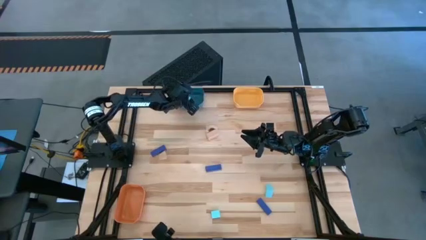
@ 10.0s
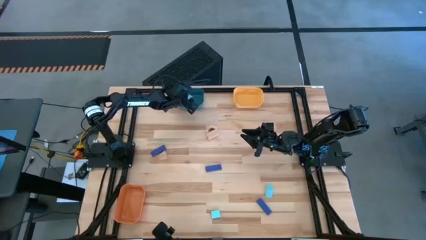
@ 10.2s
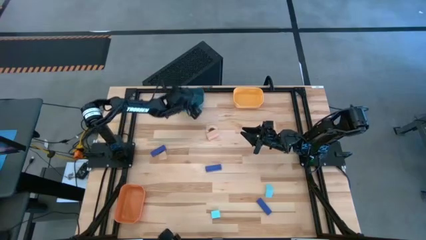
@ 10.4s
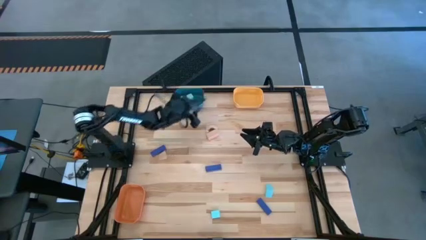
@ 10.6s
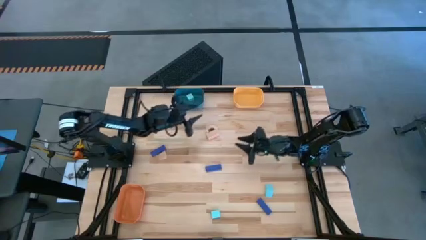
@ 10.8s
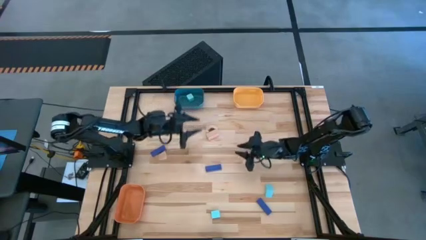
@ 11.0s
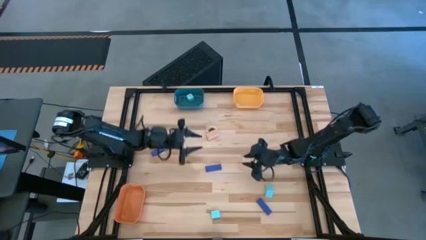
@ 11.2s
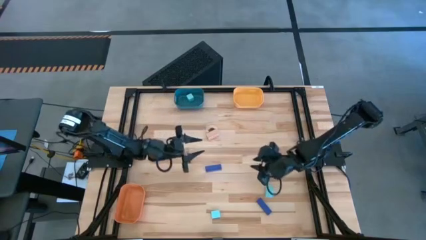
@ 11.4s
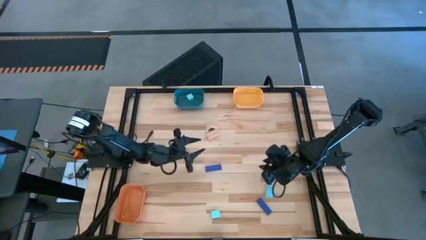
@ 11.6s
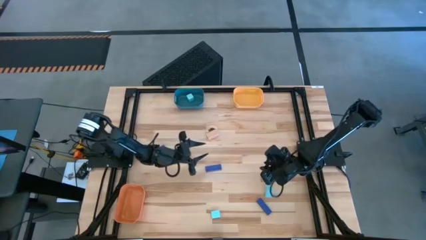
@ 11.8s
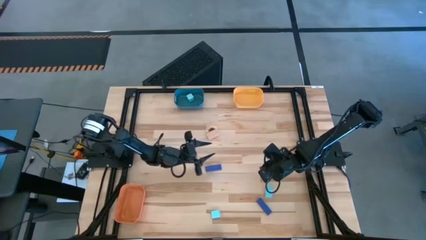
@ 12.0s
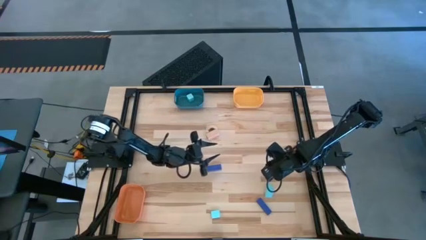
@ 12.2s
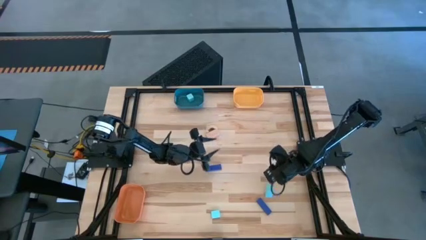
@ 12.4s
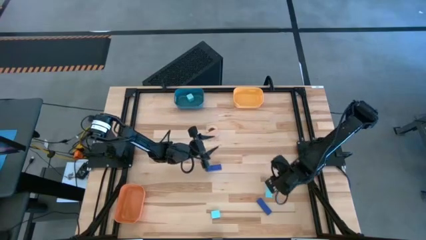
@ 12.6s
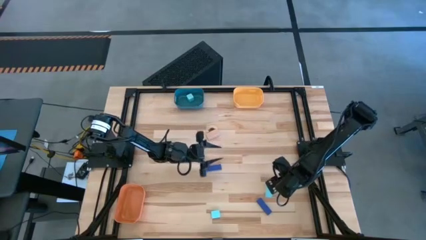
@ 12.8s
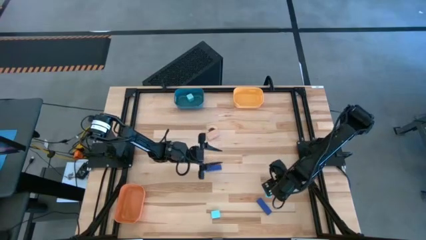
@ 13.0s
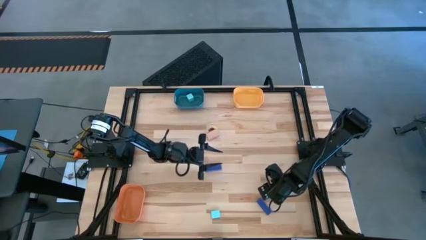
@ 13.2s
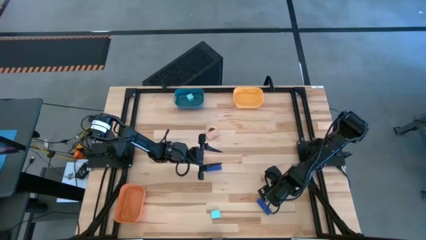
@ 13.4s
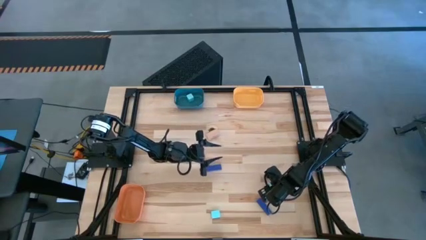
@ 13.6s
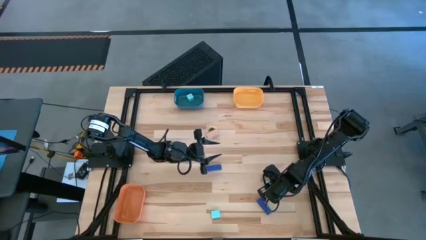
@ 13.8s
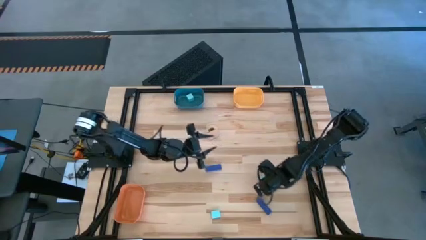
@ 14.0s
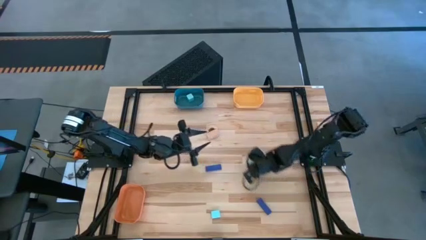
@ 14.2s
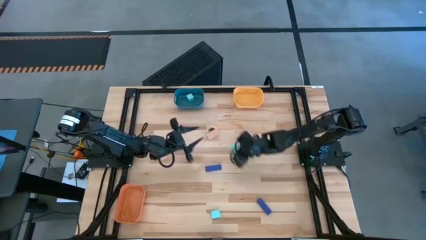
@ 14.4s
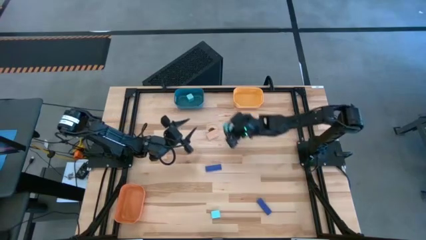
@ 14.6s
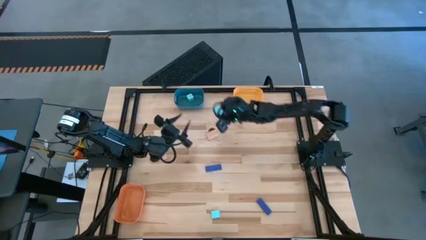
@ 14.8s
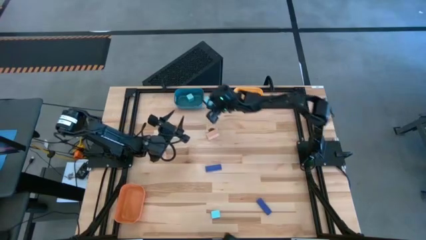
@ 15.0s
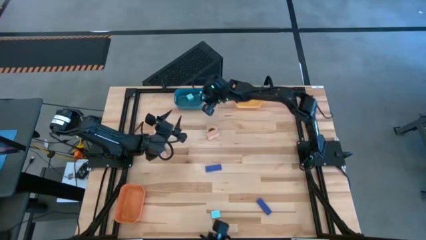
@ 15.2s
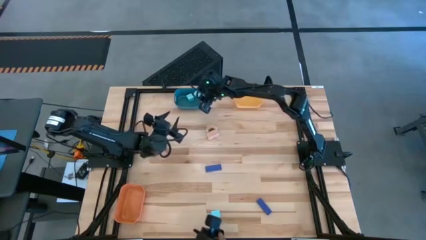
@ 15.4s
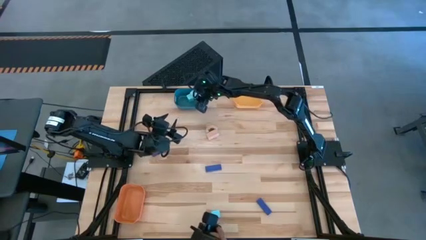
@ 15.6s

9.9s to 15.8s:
Task: Sort & place blocks by color
Put the middle right light blue block into the dark blue bin

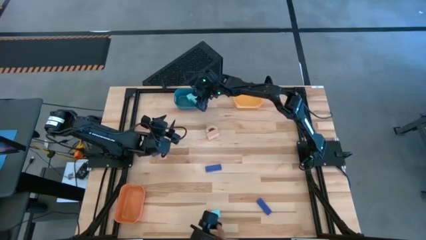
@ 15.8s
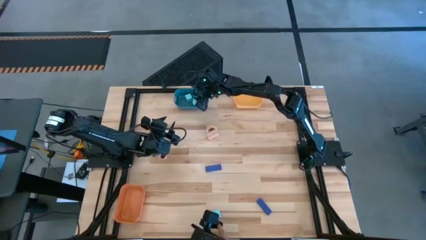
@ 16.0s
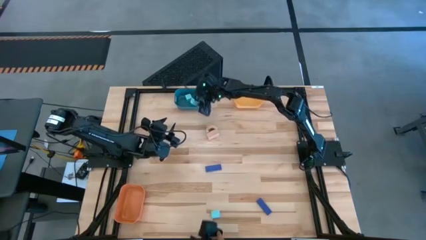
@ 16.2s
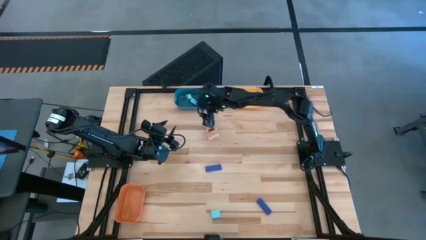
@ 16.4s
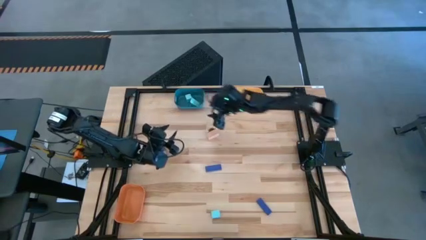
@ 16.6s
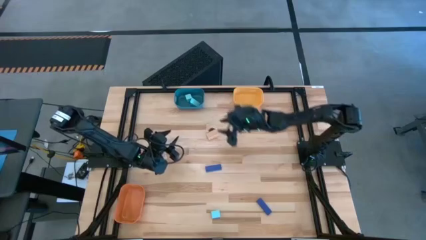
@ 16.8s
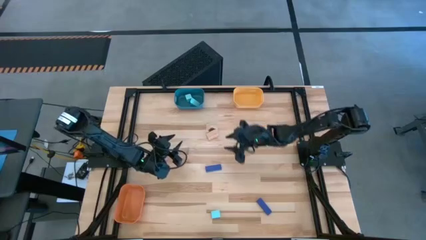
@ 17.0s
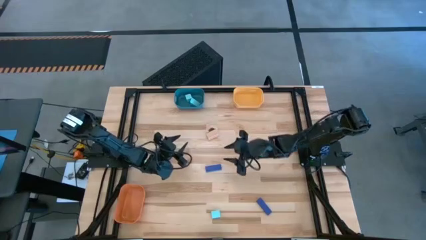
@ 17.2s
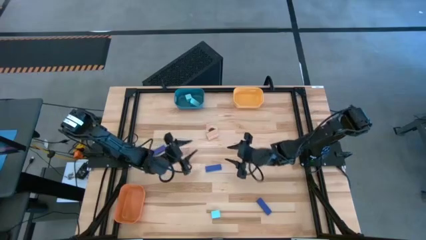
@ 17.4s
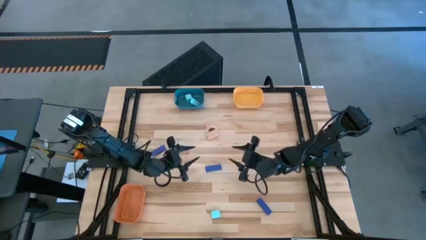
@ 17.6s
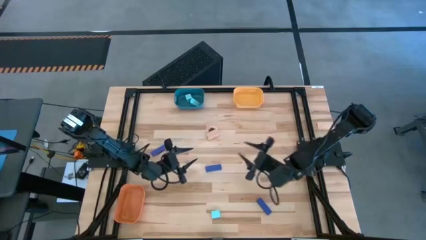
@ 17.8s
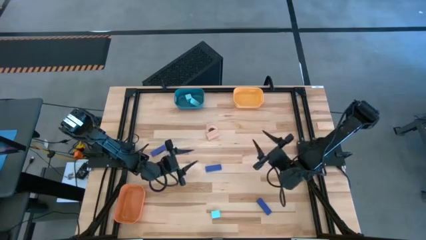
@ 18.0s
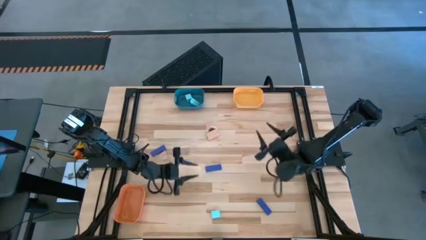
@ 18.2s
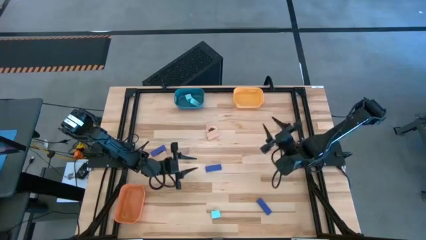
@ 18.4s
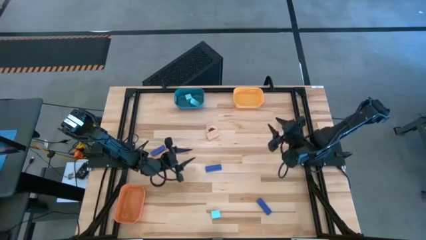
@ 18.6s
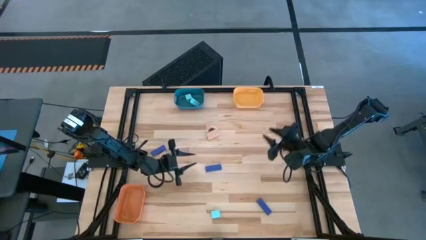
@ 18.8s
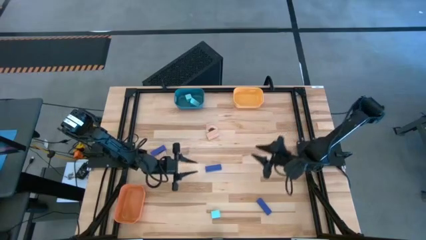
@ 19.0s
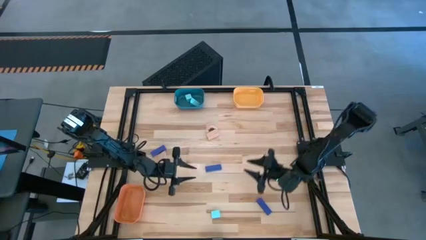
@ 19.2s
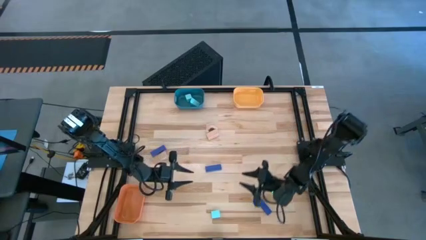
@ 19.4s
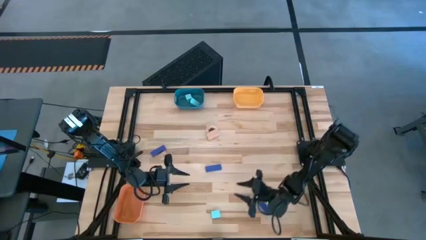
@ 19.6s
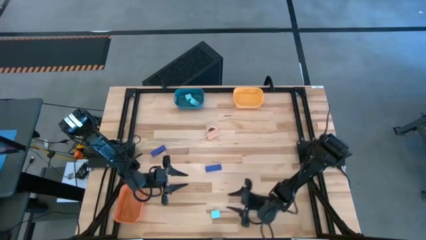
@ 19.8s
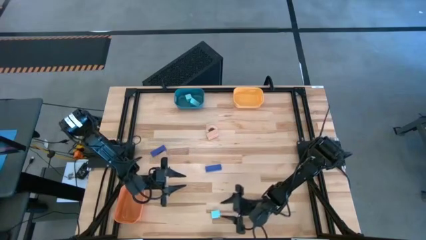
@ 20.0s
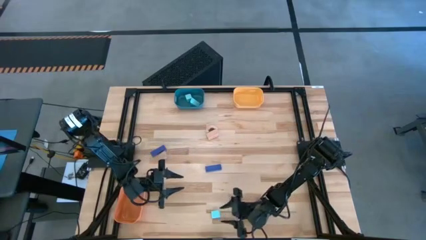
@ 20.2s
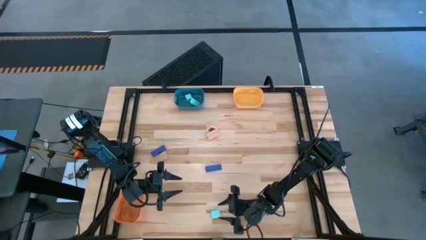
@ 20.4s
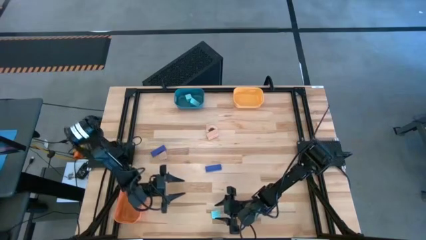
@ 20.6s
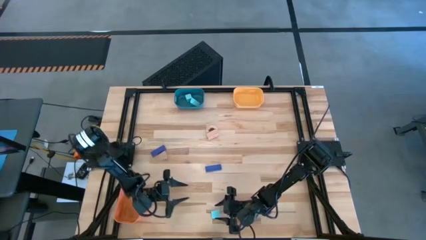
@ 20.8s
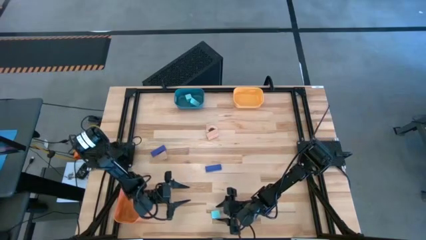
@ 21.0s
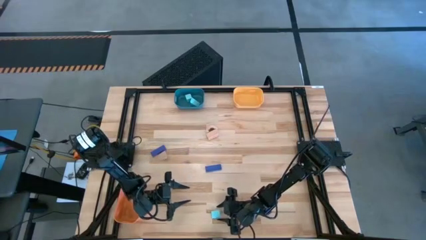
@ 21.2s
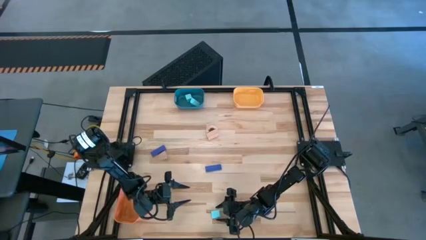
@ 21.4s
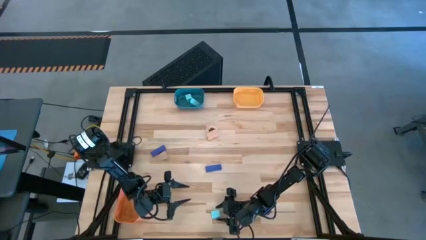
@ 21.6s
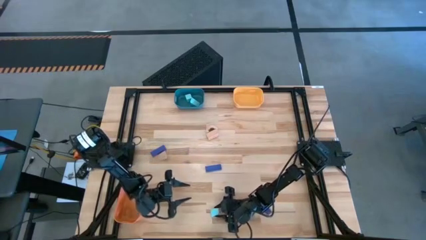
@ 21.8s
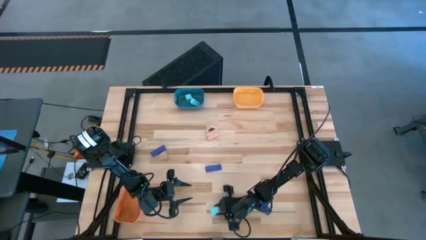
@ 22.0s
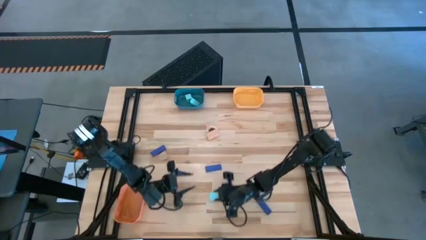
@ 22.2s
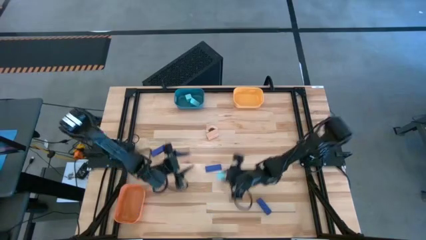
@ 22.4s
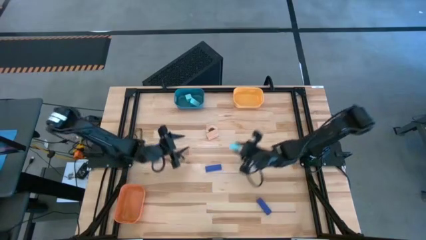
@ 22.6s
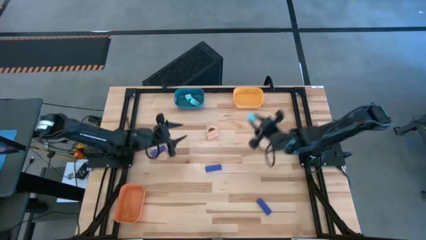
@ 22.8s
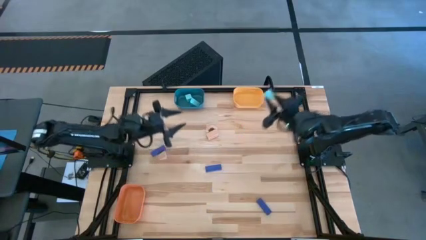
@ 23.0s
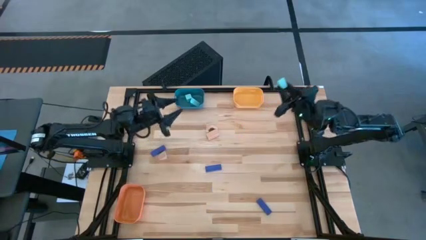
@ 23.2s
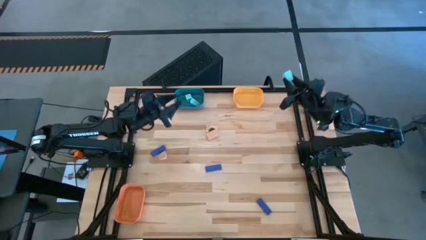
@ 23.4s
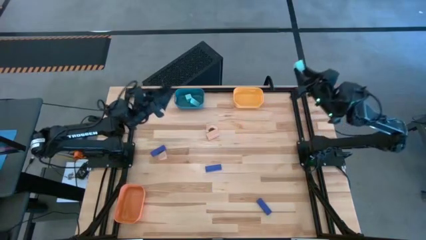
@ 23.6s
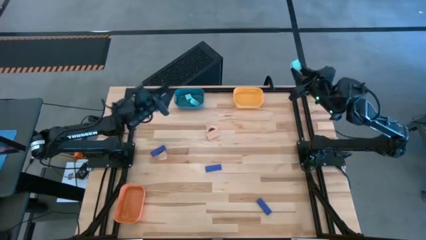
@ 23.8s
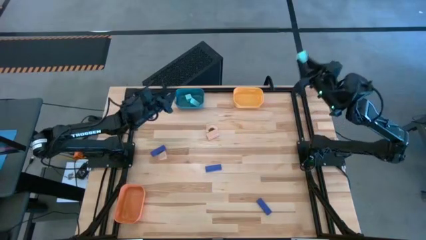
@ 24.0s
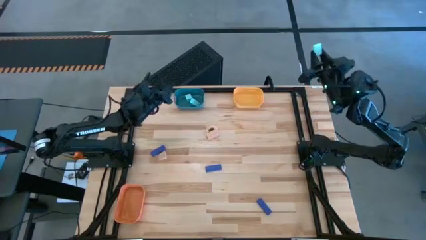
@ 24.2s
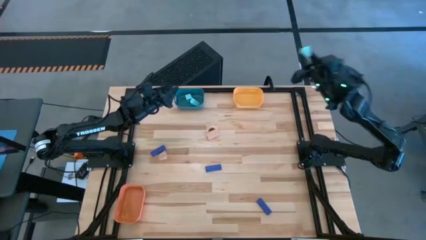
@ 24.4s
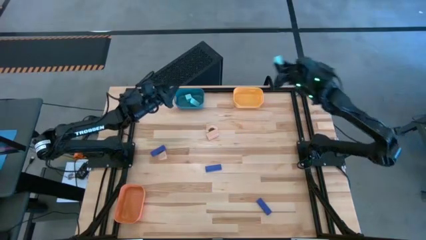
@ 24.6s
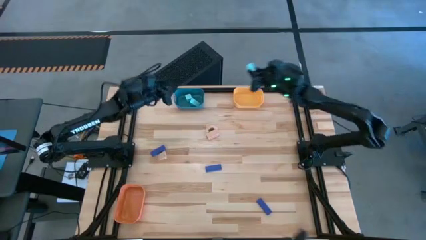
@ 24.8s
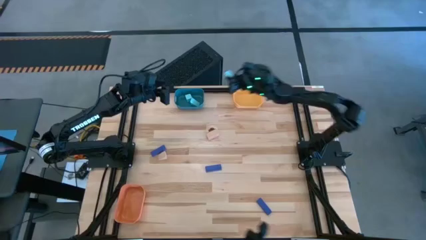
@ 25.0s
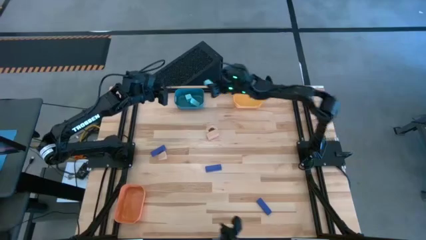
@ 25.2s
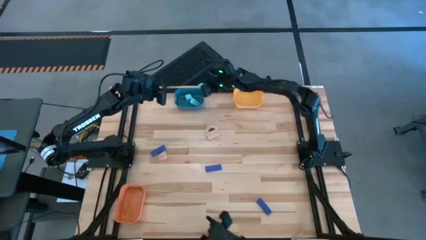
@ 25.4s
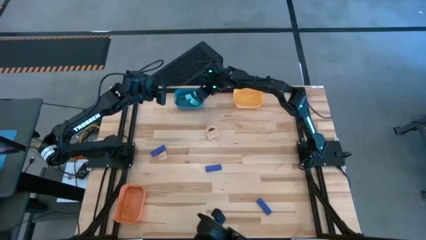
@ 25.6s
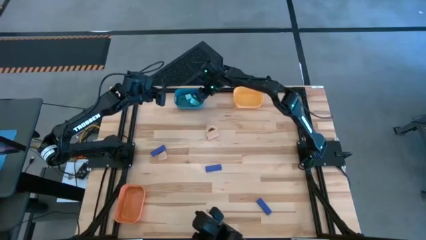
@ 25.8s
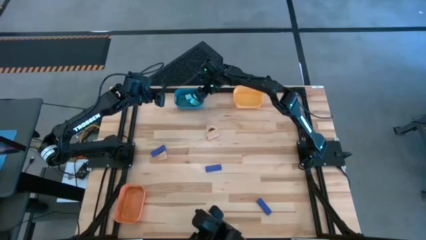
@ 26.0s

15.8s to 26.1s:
Put the light blue block into the dark blue bin
